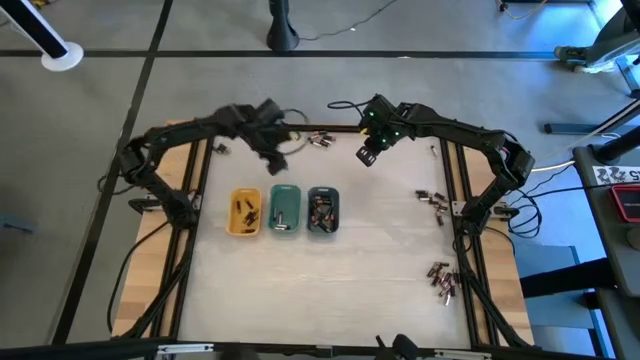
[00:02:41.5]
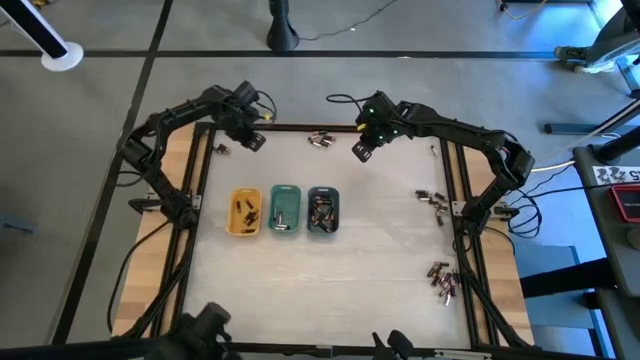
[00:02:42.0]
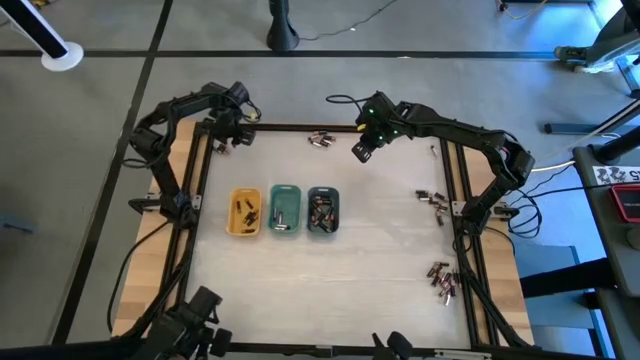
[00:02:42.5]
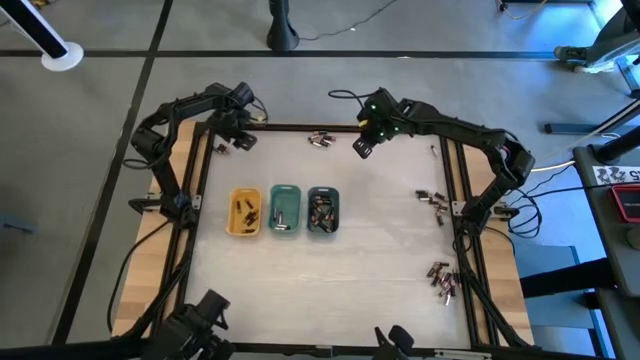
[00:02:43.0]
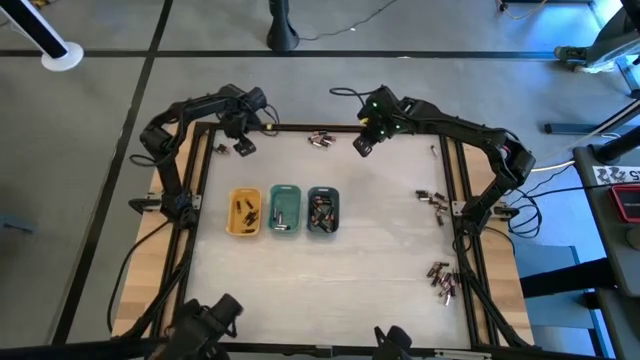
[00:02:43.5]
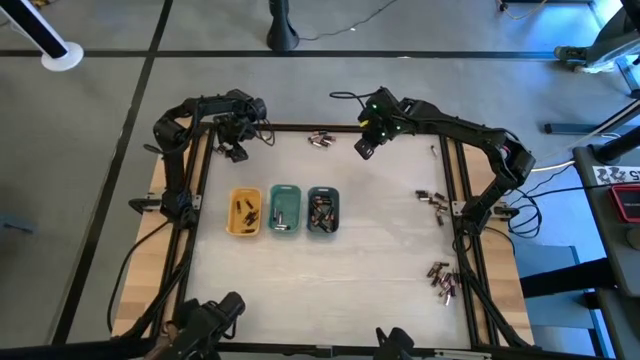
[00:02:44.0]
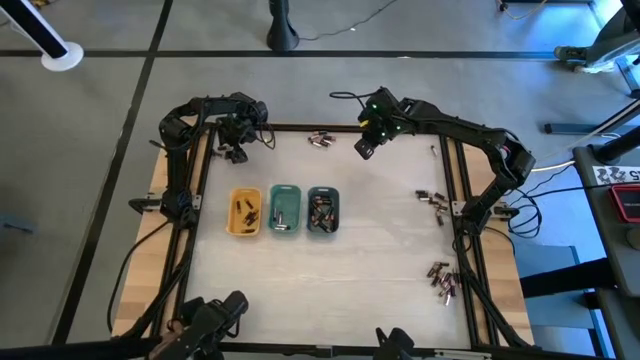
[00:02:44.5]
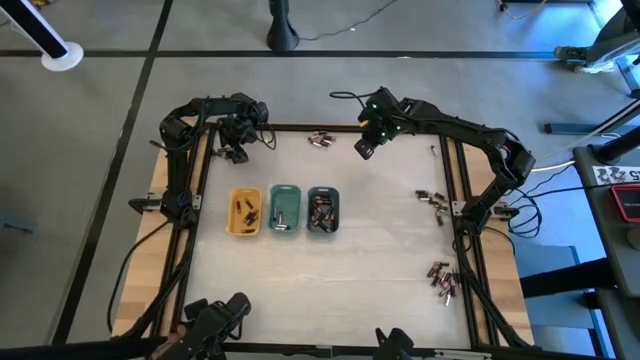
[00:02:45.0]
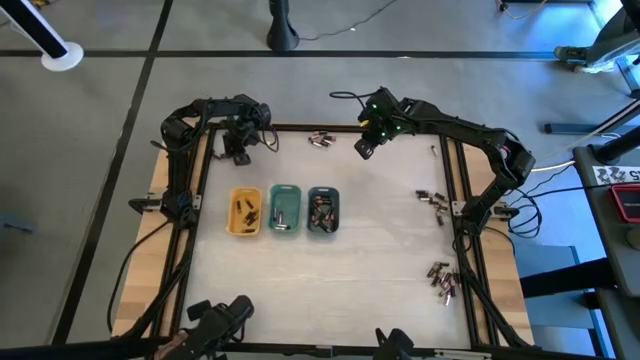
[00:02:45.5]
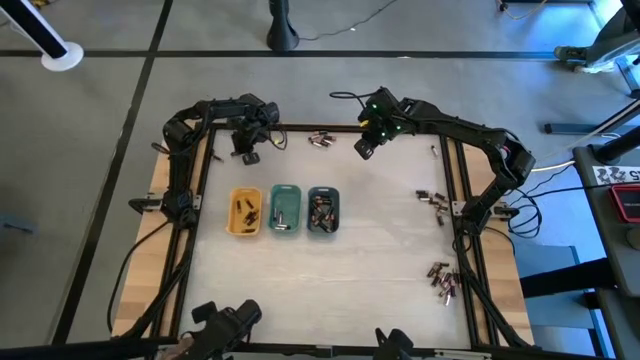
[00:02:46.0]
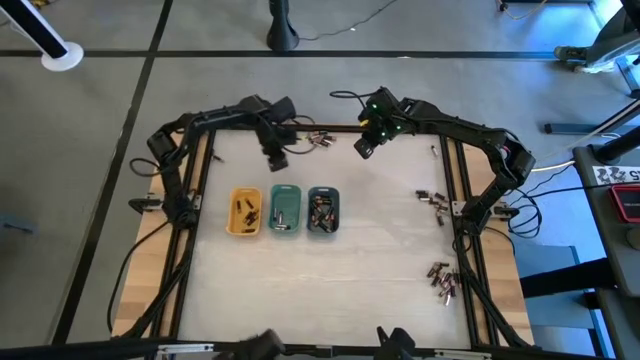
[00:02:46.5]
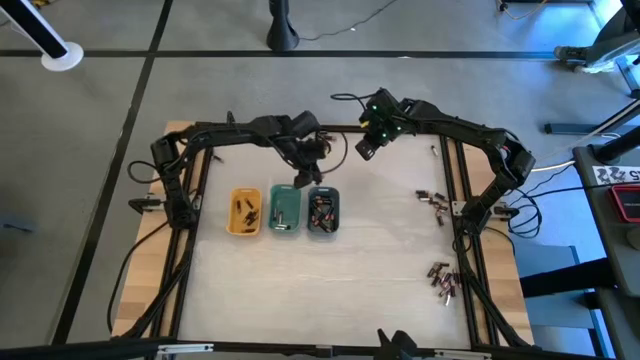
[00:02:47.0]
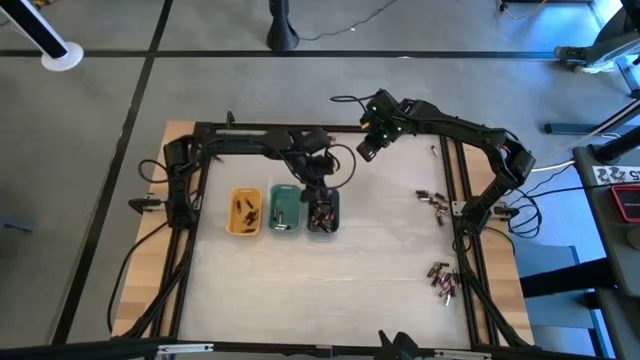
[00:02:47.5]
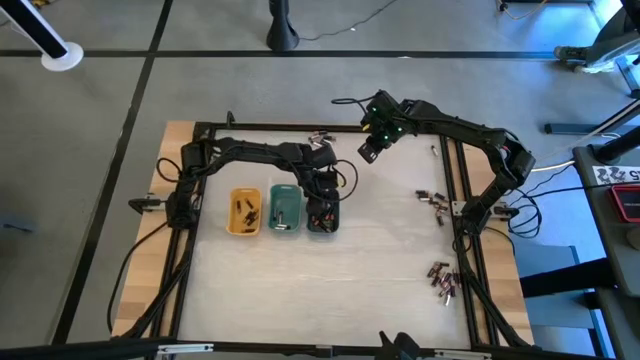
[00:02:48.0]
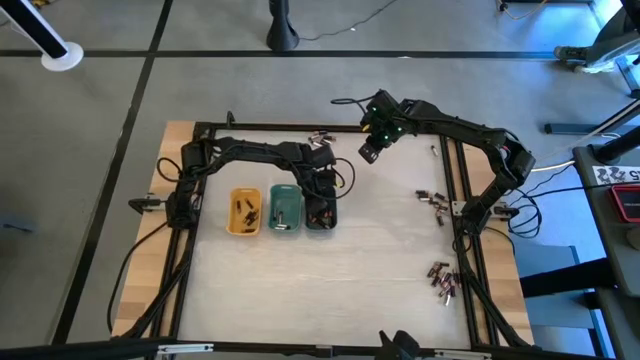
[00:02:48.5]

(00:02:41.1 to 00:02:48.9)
Task: Sort batteries
Put the large black battery into the blue bin

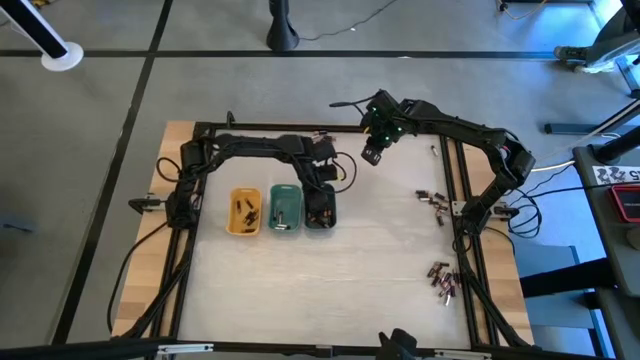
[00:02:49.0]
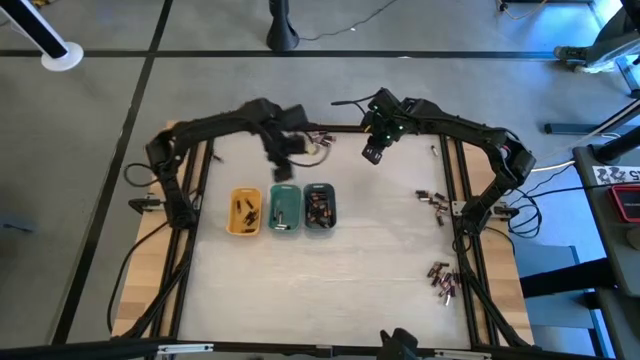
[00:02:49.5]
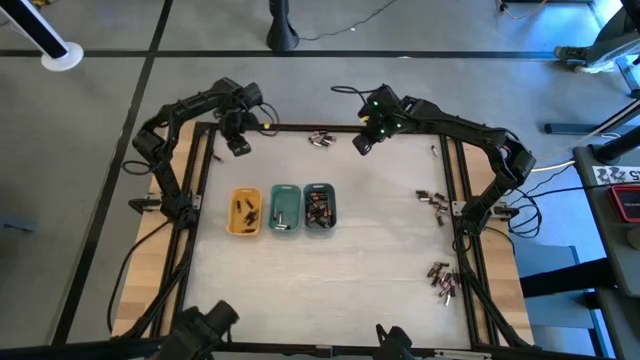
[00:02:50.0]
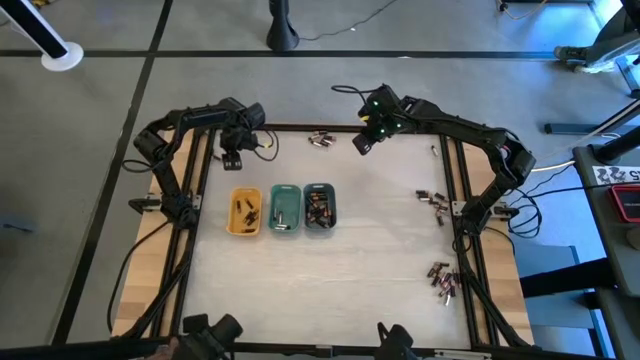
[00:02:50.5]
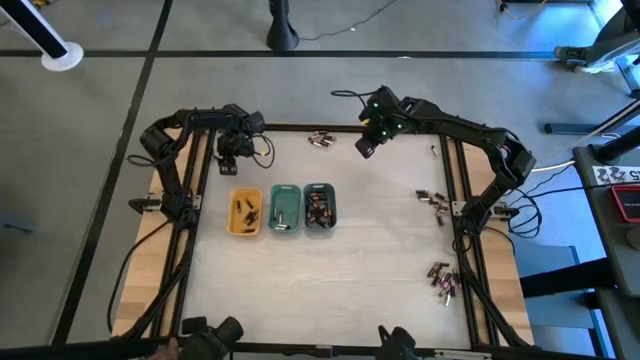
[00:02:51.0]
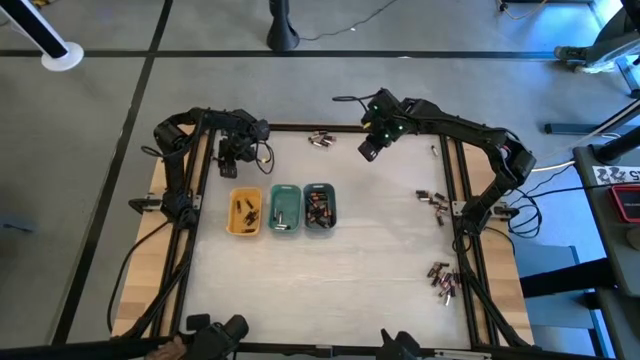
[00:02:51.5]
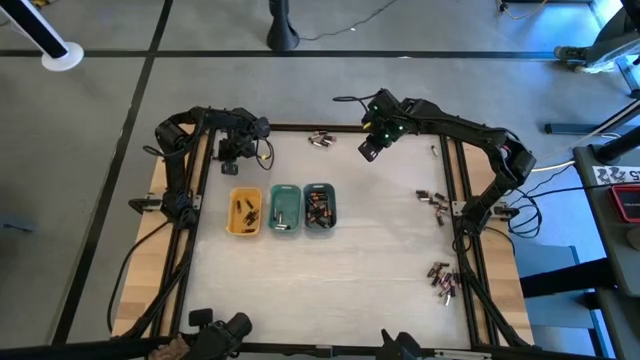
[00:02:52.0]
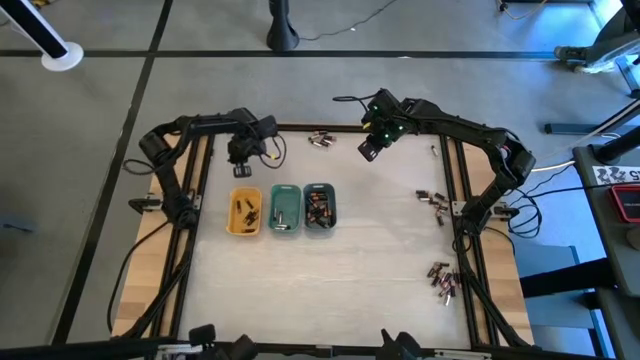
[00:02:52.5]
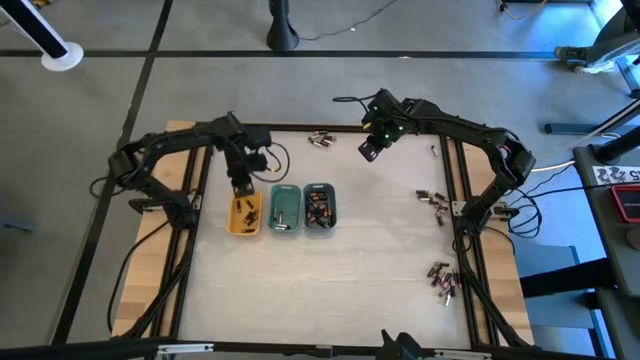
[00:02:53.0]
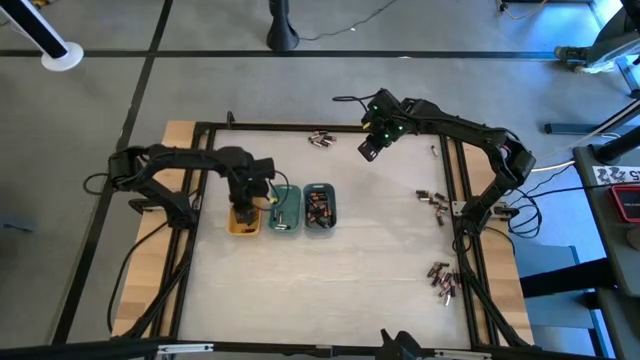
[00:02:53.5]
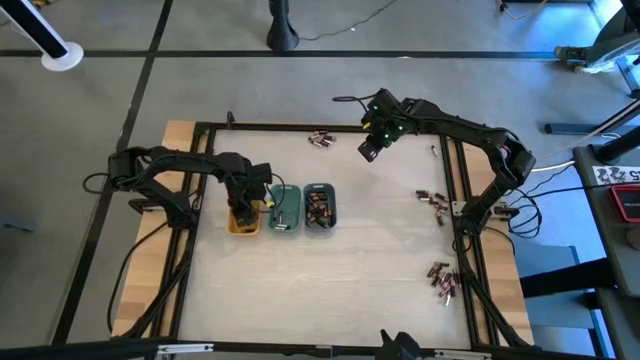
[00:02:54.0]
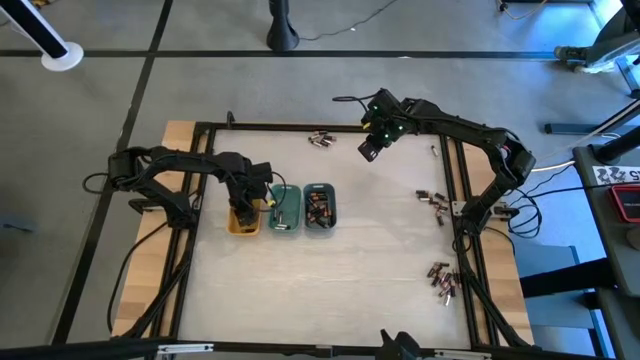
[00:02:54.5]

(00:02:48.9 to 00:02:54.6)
Put the small black battery into the yellow bin

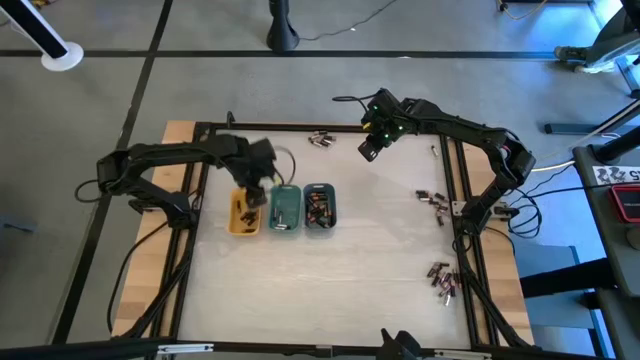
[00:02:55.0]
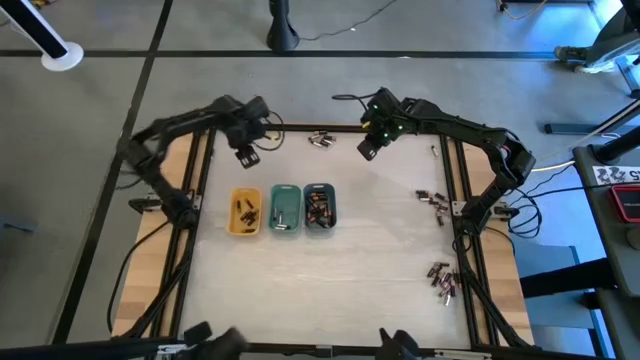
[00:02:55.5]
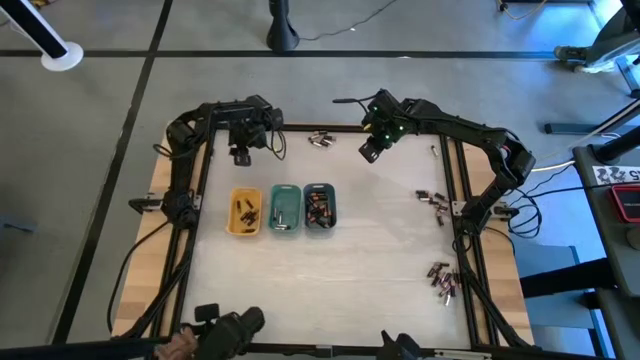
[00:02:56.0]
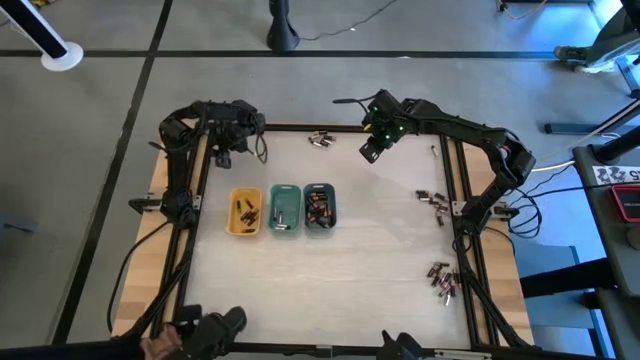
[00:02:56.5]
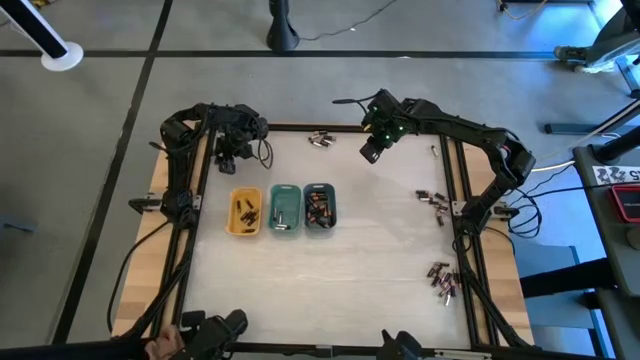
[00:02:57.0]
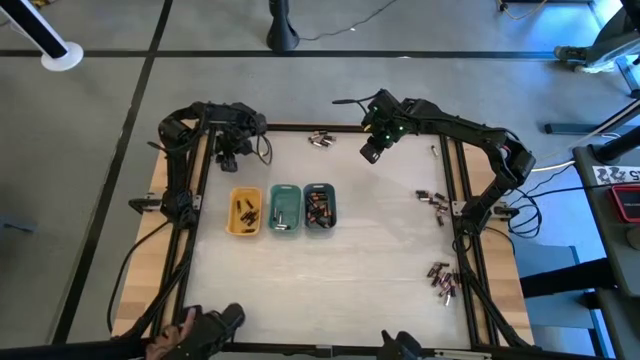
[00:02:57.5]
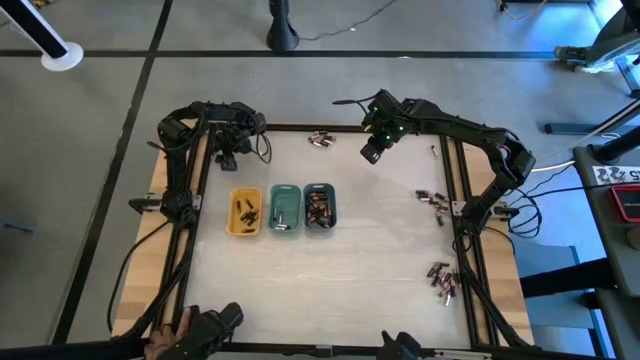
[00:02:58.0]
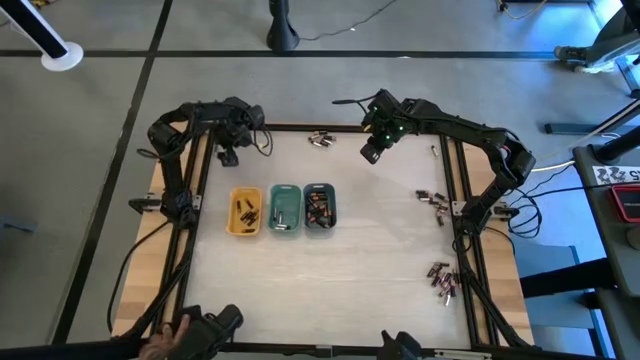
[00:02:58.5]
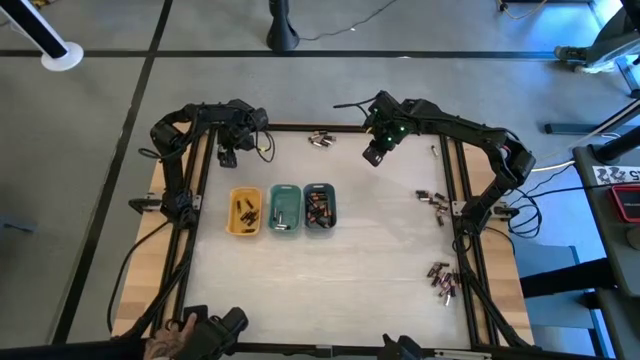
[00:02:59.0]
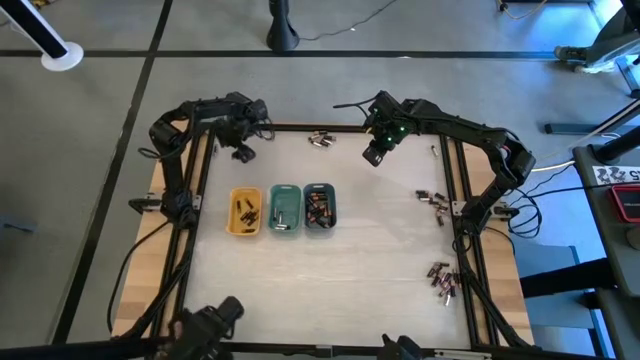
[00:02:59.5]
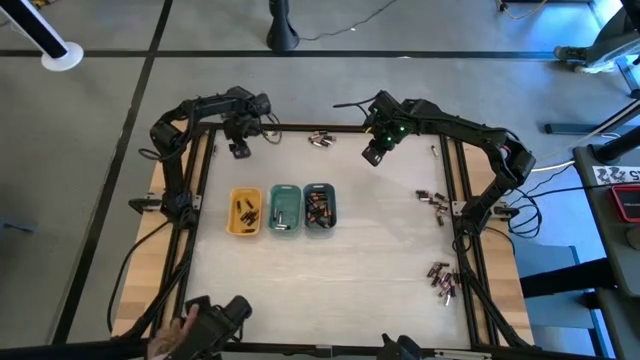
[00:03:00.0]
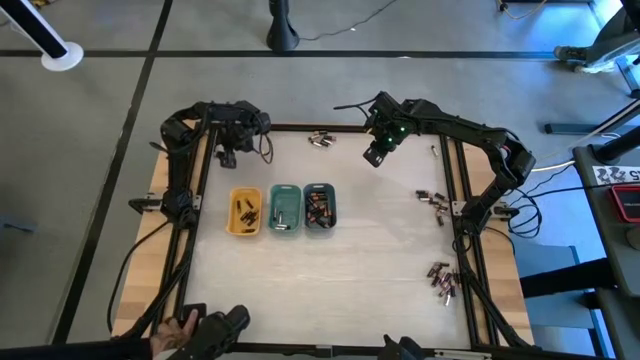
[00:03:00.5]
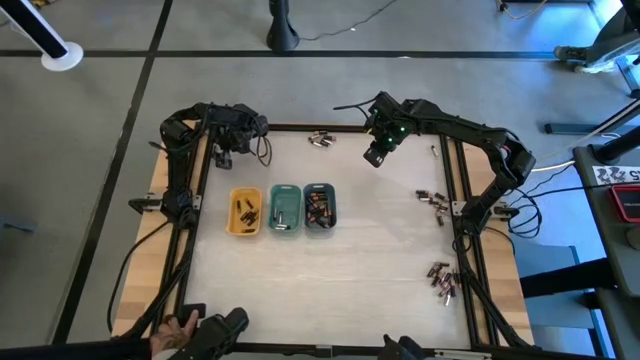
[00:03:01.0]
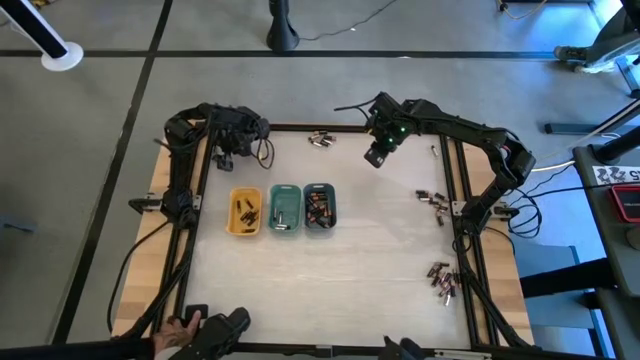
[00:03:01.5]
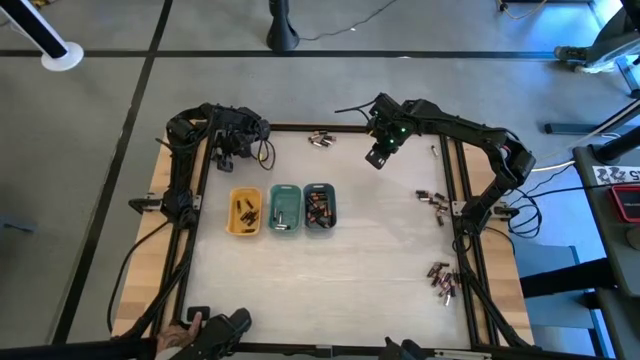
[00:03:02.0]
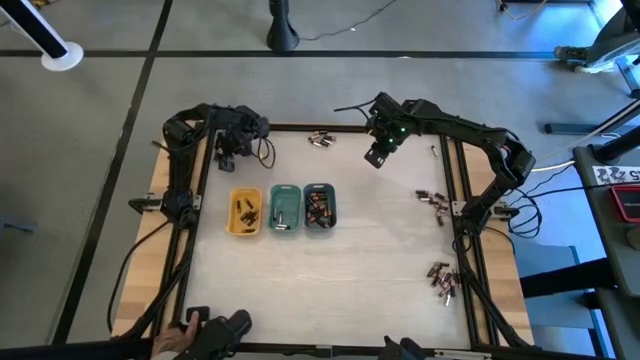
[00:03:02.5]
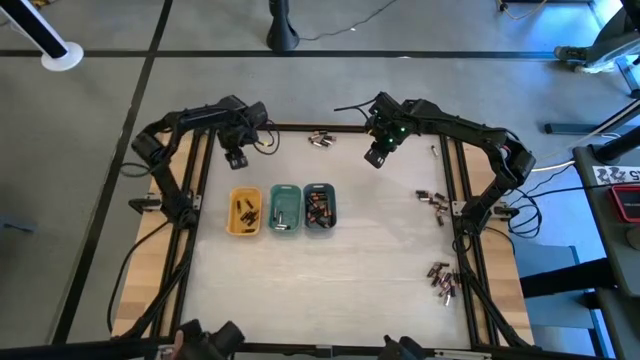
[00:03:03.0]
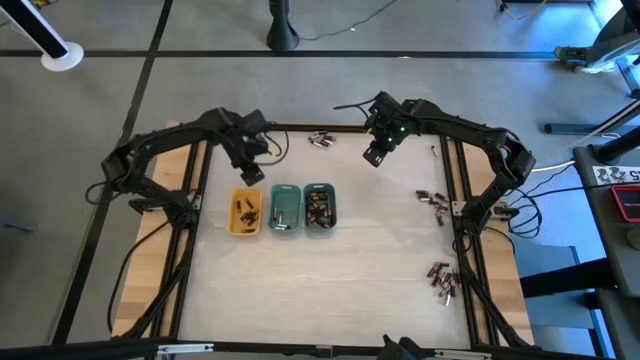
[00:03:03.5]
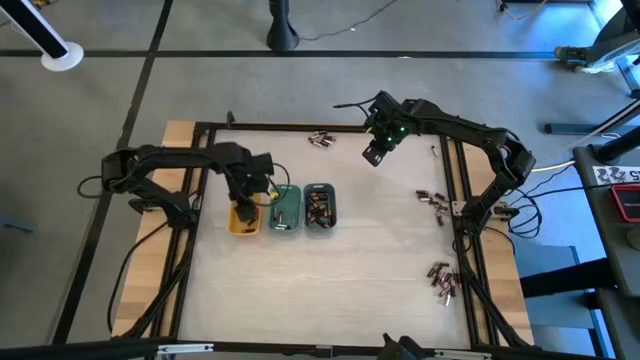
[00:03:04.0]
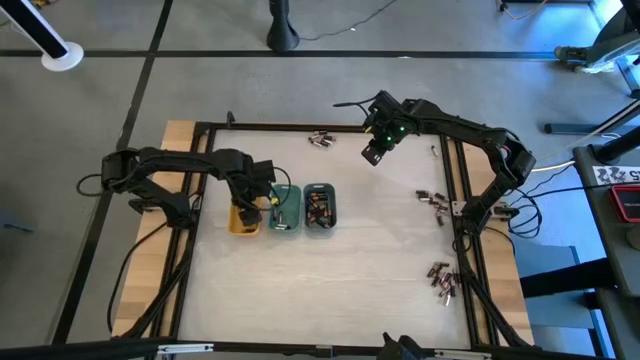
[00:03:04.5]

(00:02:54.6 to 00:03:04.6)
Put the small black battery into the yellow bin
